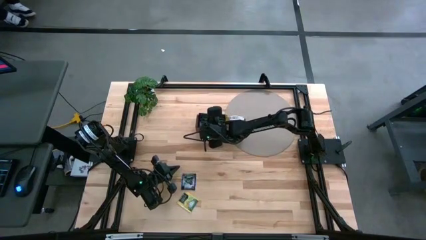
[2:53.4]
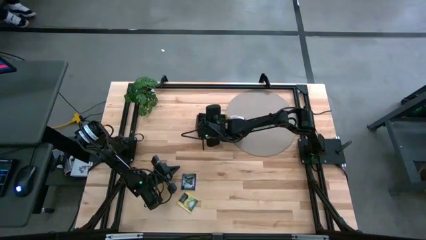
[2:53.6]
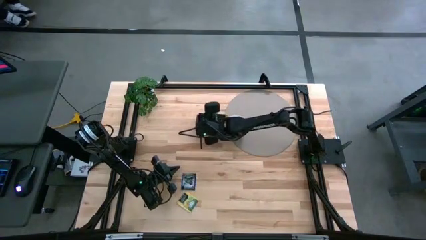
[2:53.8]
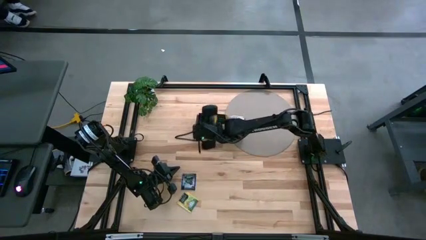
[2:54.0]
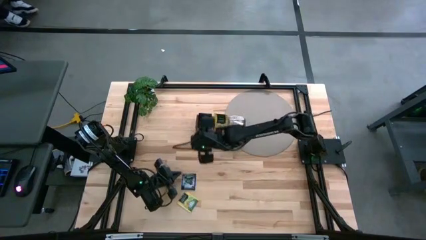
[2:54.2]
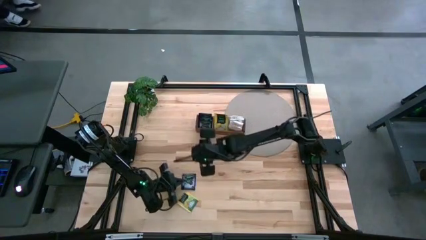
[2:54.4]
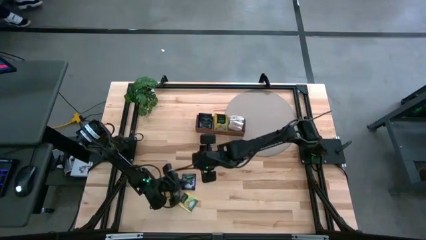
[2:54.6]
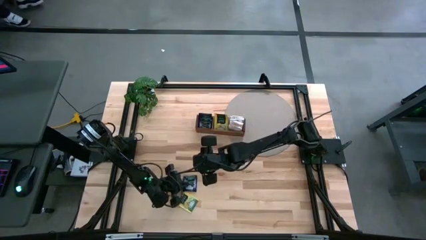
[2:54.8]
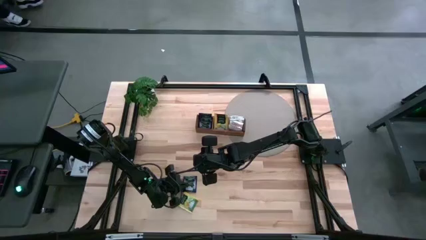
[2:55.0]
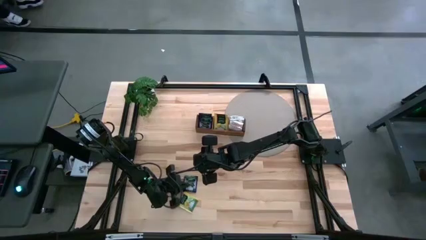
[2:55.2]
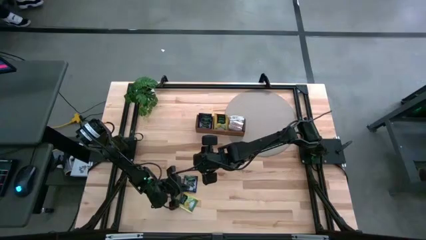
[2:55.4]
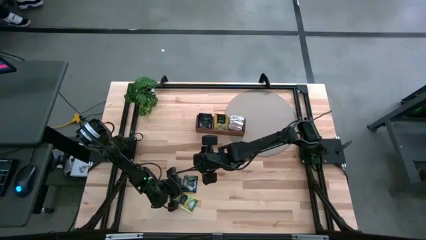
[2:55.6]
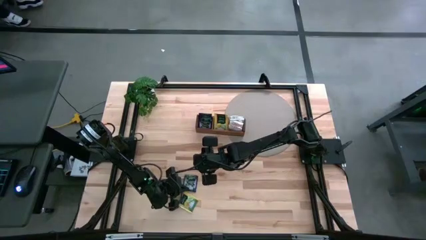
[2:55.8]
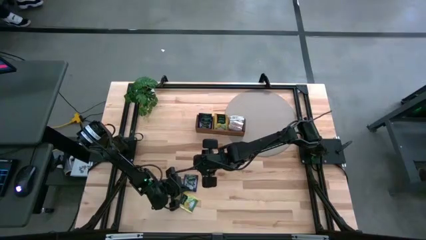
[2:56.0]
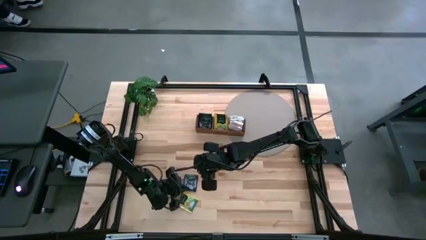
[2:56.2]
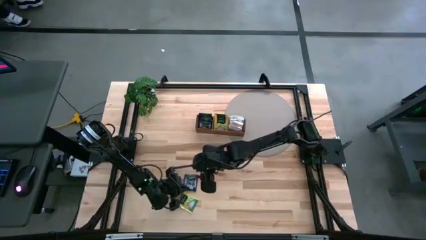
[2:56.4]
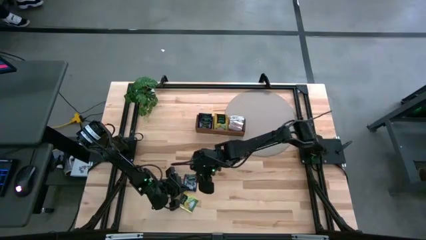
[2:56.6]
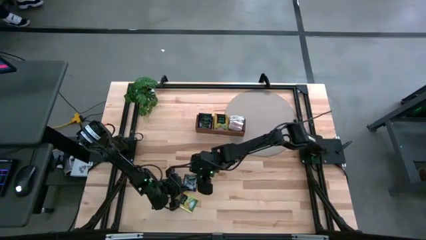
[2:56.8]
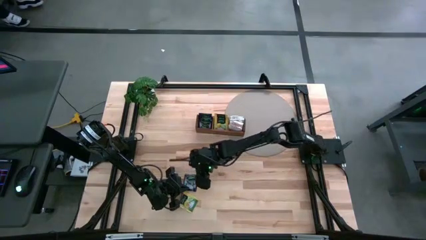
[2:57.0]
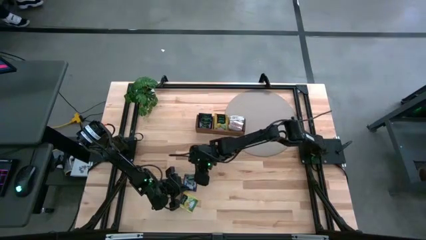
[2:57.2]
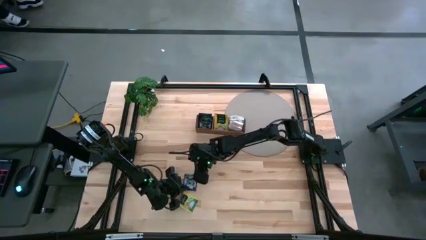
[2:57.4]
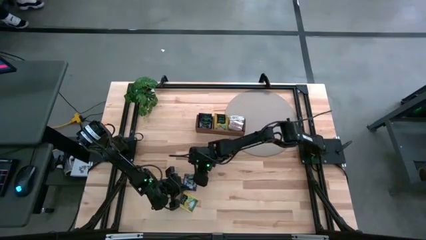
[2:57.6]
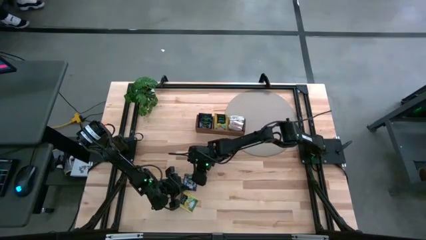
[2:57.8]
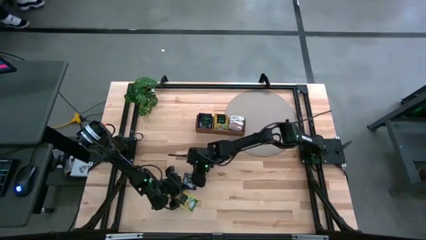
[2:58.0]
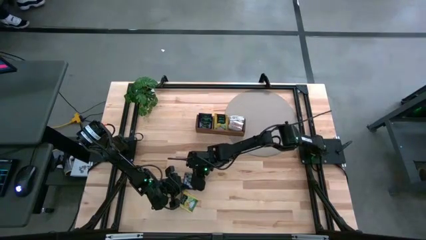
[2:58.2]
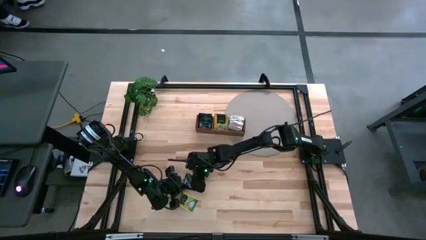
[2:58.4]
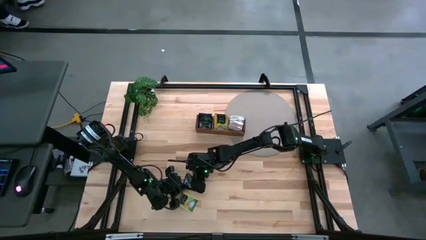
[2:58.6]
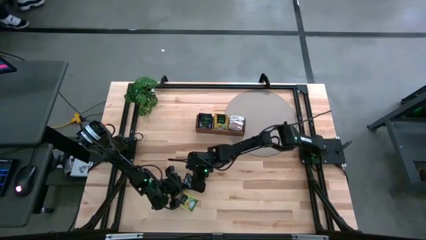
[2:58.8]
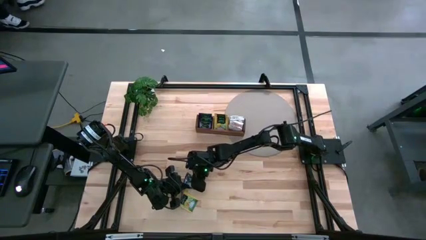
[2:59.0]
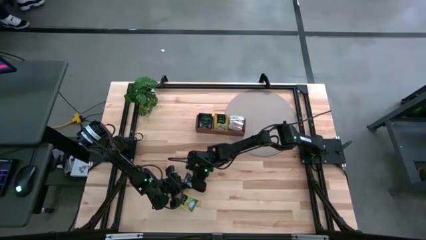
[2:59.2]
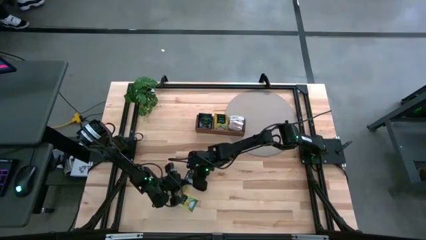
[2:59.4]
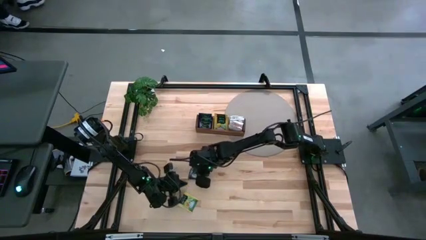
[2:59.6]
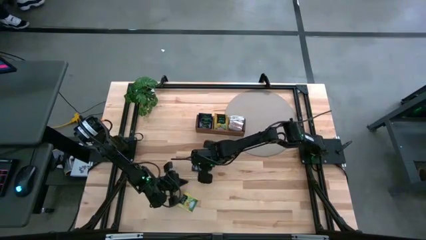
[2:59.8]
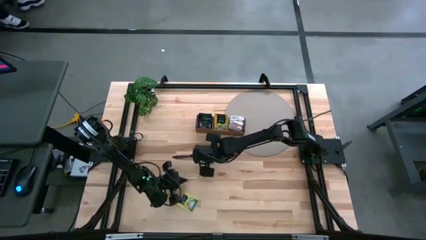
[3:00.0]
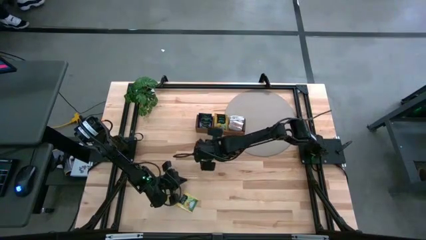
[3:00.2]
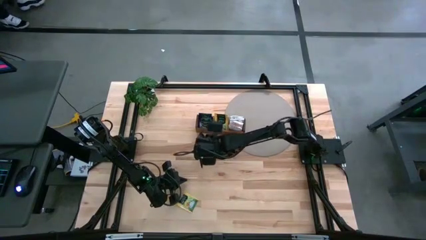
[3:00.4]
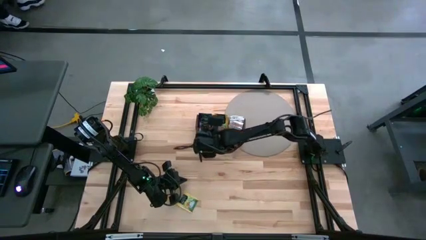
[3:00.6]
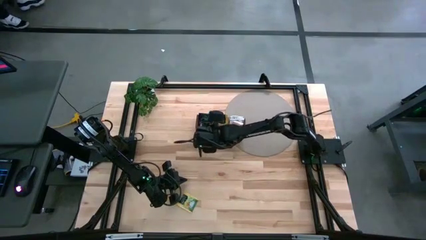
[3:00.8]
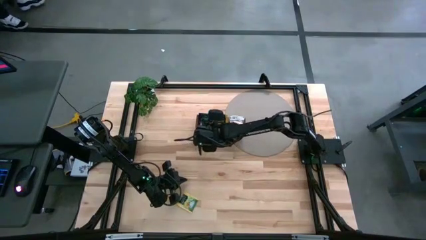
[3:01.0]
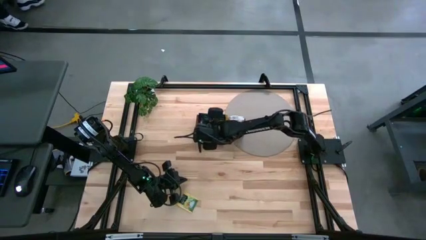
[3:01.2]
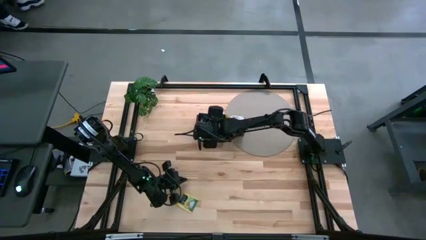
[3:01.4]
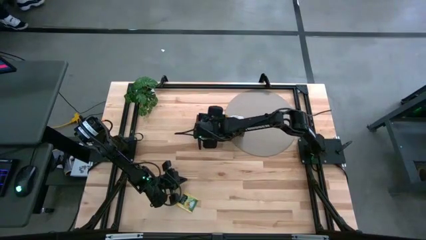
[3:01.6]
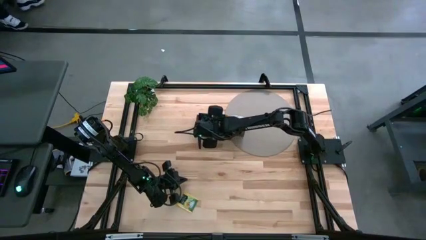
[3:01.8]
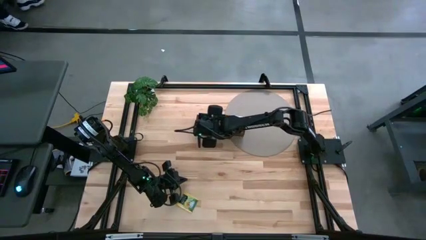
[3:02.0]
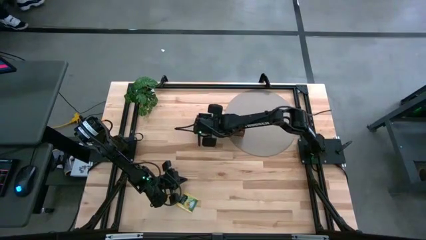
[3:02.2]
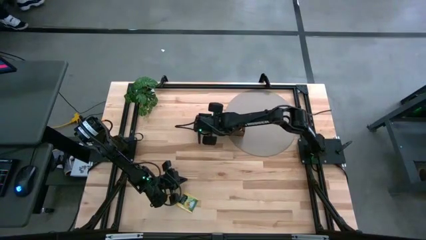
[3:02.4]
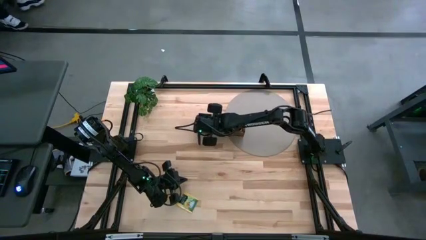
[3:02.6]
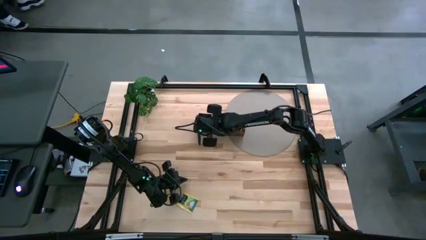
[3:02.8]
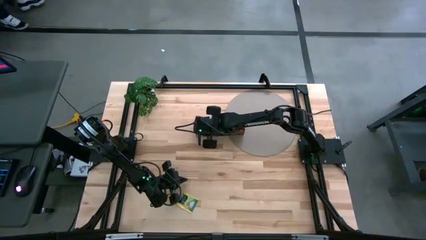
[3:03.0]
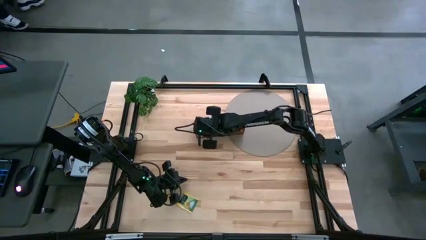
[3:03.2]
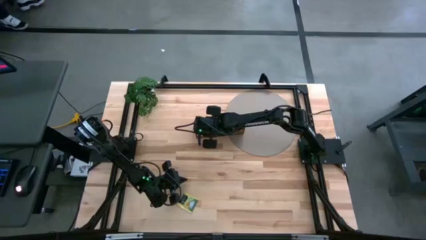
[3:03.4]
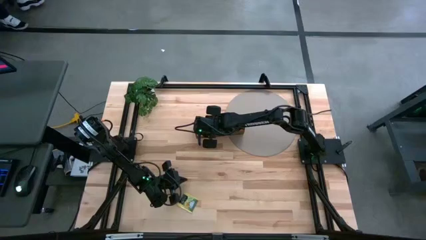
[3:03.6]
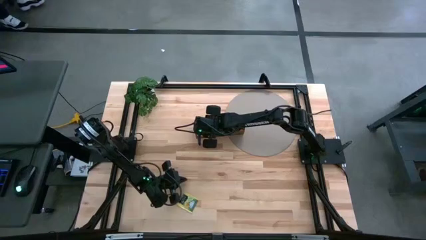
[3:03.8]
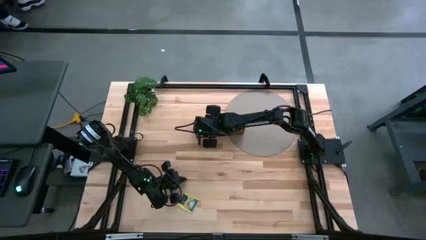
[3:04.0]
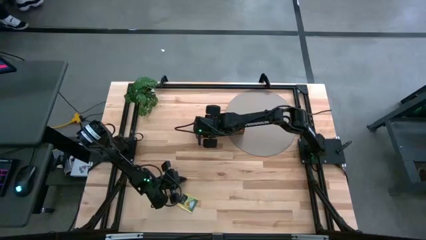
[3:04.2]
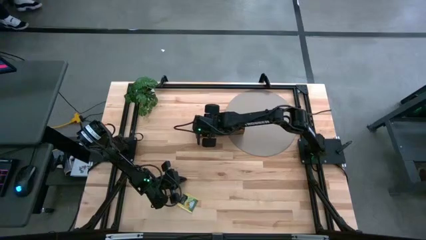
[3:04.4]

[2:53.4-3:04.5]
Task: Pick & Place Tea
Put the violet tea bag into the left section of the wooden organizer
